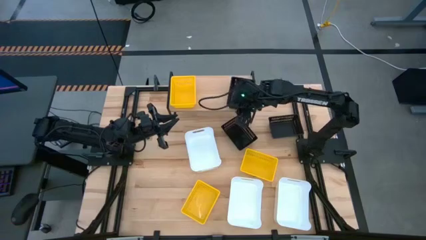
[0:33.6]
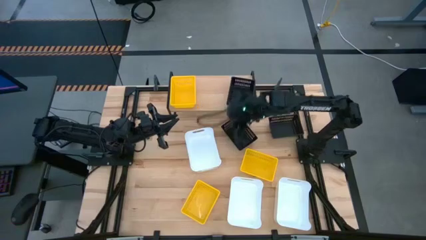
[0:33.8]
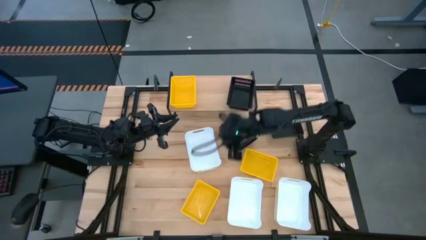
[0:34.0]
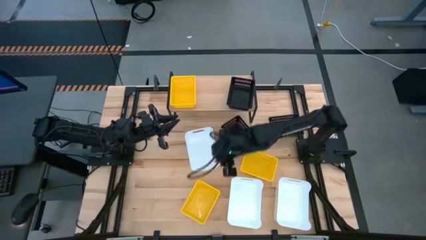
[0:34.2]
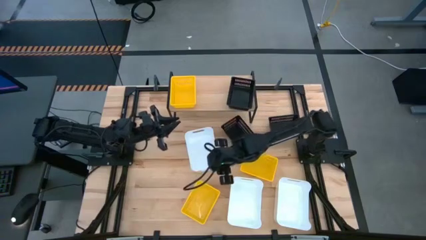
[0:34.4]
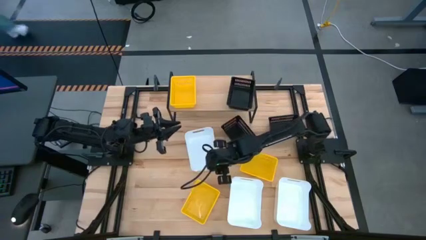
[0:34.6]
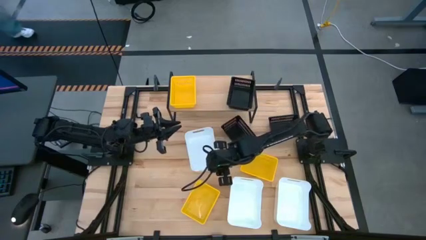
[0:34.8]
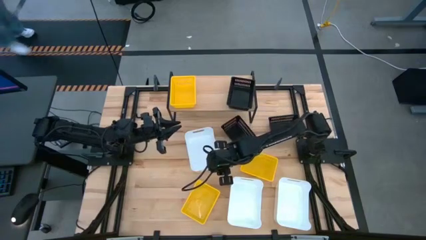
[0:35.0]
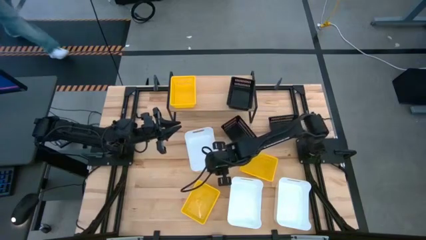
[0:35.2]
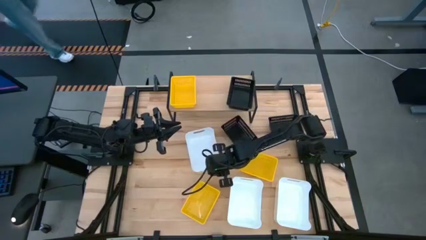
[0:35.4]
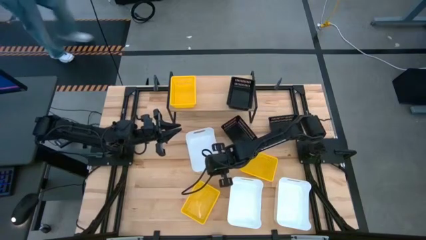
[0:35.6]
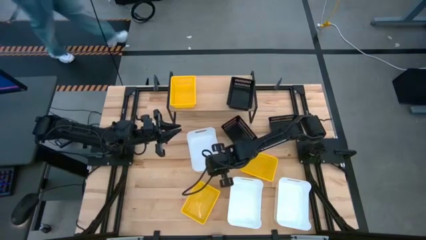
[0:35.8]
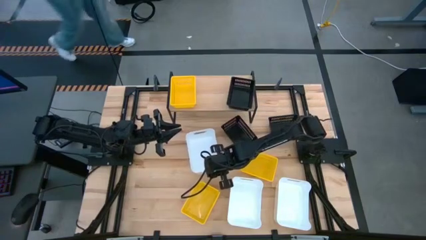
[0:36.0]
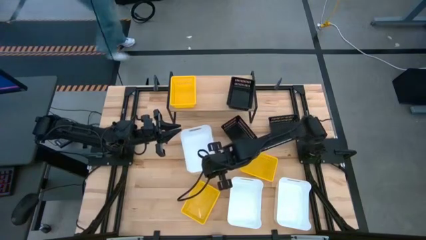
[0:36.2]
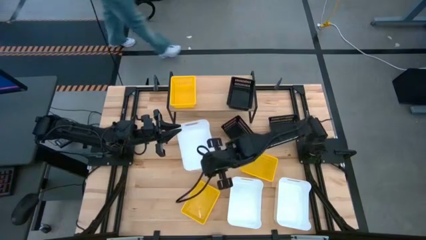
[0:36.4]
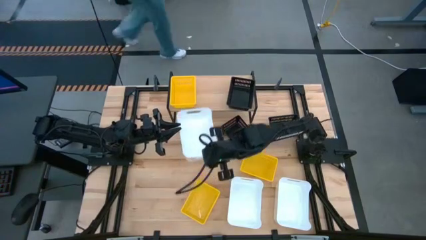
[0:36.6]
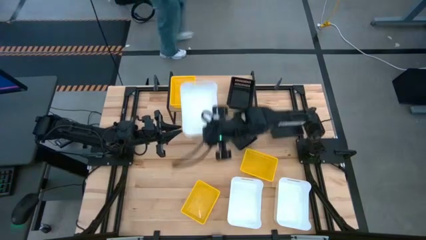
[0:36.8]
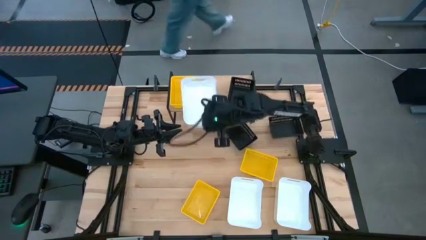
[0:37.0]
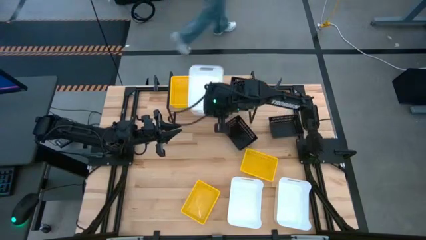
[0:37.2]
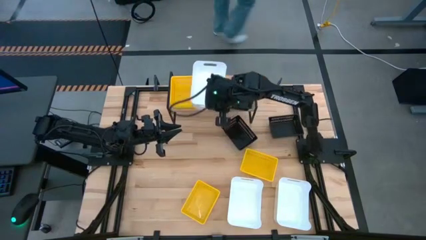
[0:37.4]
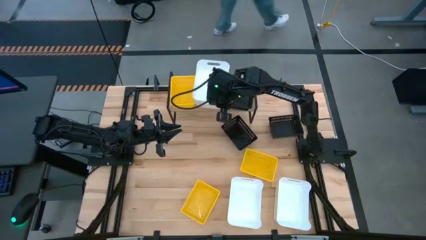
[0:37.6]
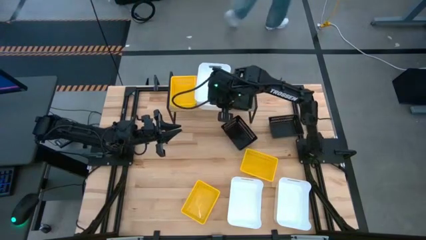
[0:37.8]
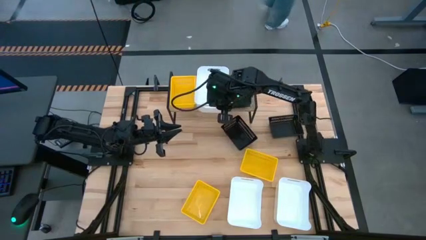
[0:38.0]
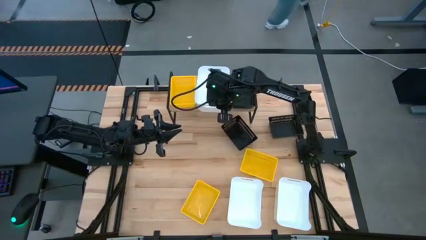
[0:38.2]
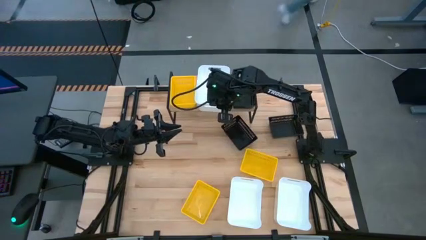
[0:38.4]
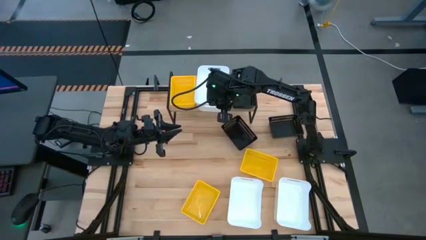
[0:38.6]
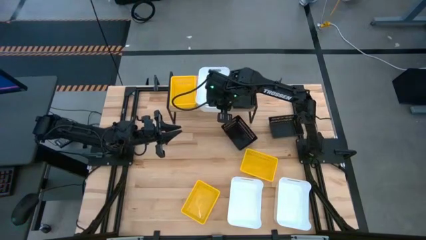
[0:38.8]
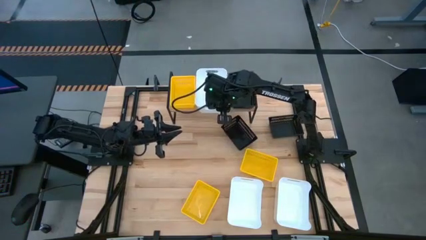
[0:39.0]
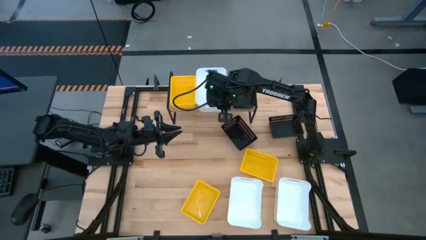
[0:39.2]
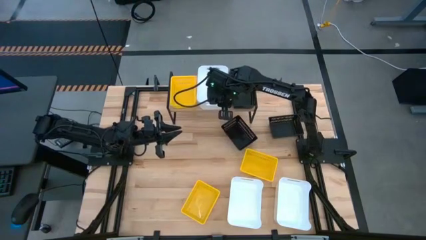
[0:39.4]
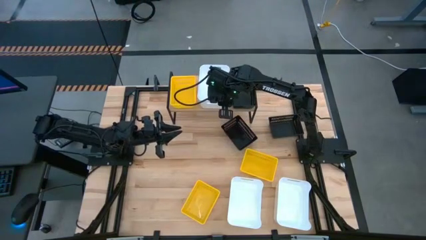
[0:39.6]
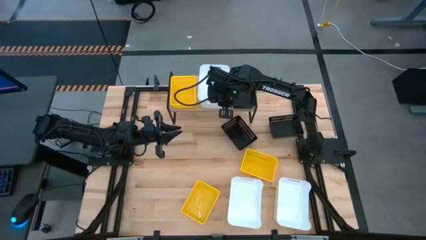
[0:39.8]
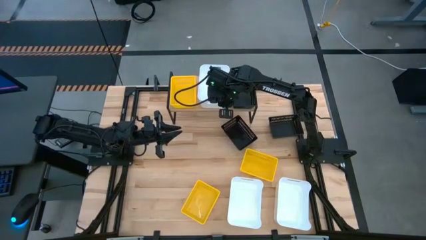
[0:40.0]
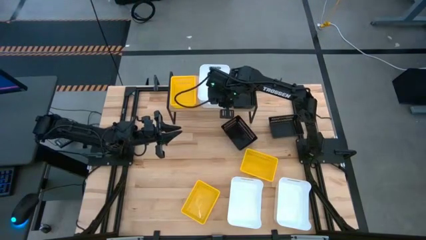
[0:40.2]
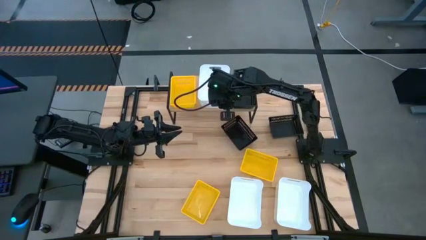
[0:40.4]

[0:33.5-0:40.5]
Task: Stack baskets on shelf by color
Put the top white bin on the shelf

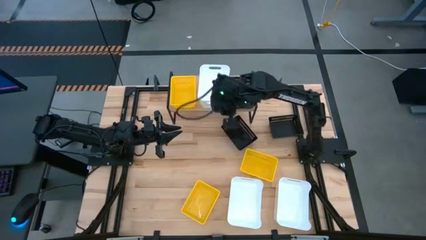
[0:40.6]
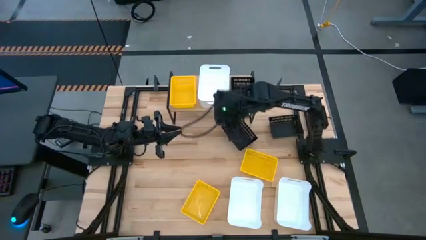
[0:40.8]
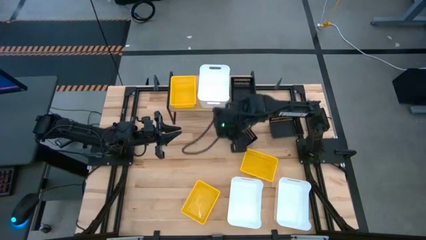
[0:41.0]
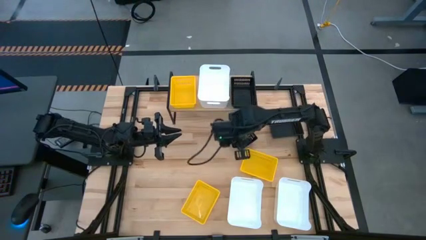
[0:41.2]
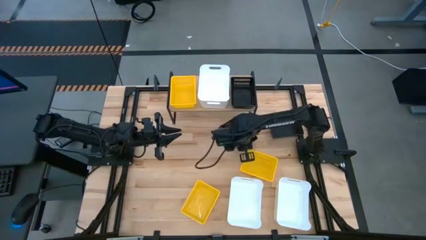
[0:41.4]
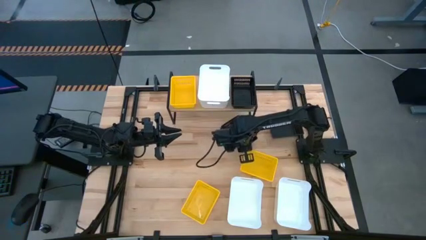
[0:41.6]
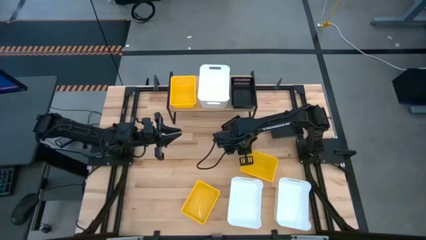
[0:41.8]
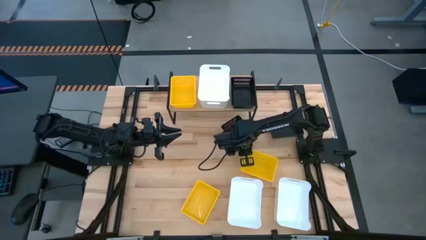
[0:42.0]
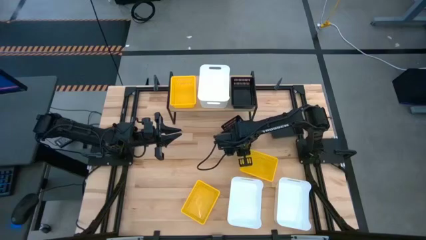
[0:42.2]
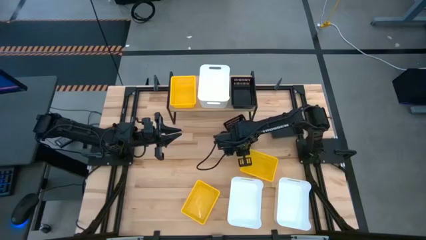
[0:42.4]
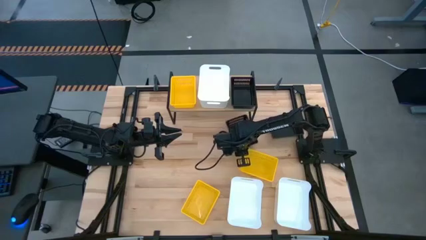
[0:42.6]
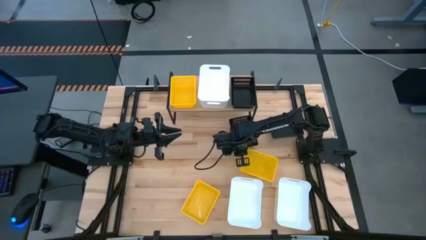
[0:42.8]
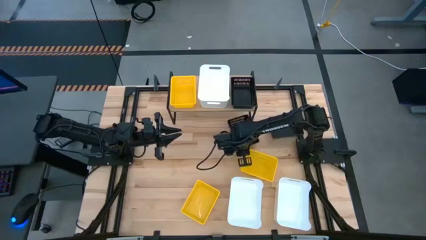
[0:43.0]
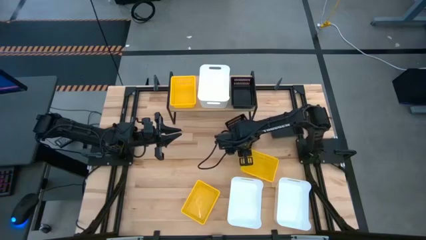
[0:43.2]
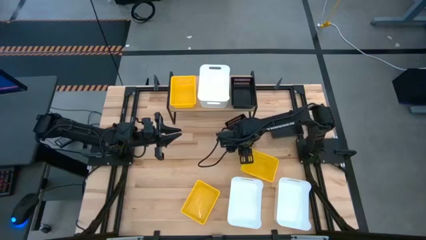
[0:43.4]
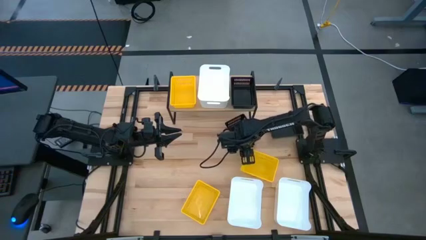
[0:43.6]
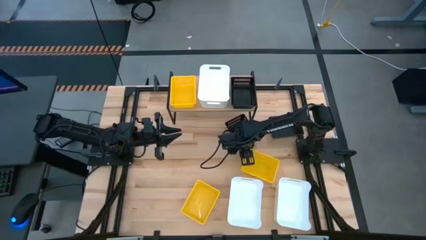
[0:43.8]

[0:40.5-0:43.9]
Stack the left black basket on the black basket on the shelf

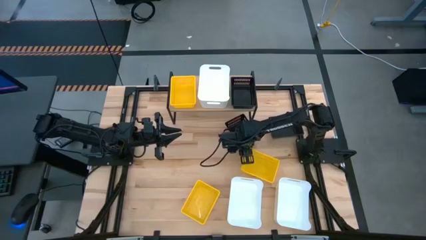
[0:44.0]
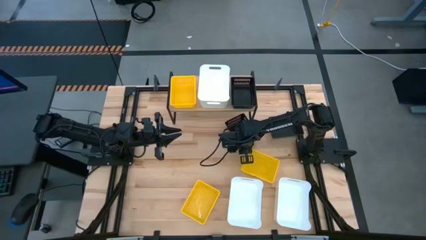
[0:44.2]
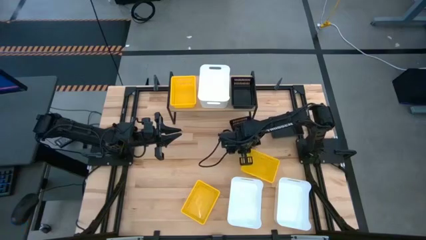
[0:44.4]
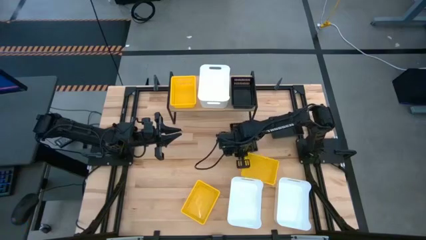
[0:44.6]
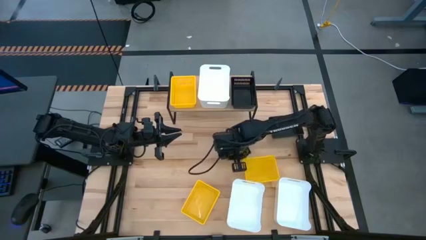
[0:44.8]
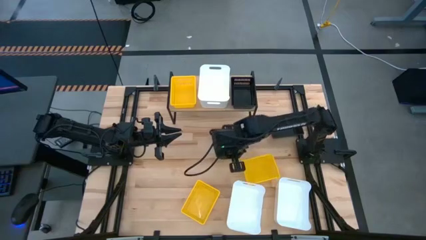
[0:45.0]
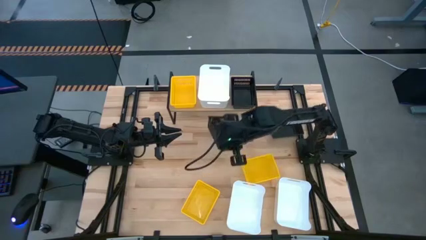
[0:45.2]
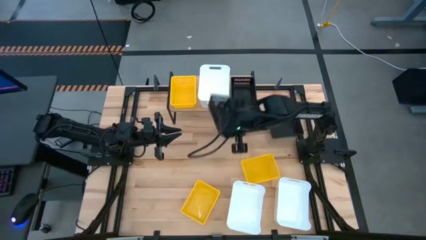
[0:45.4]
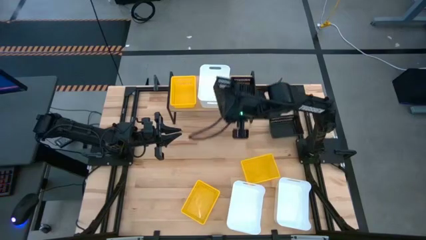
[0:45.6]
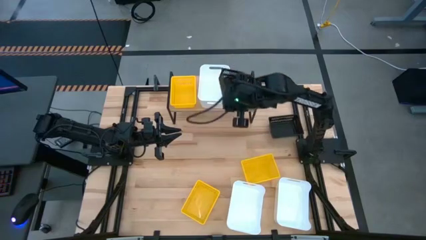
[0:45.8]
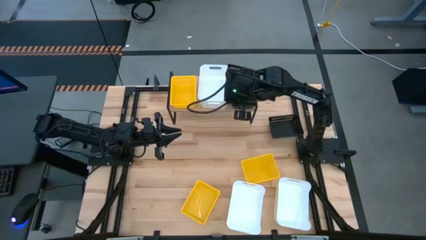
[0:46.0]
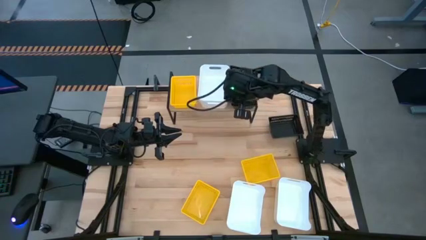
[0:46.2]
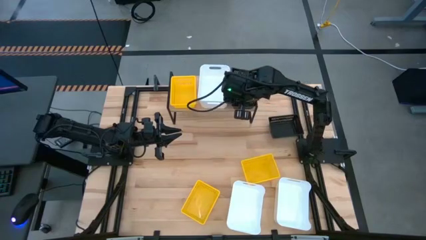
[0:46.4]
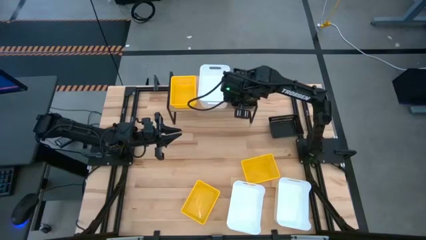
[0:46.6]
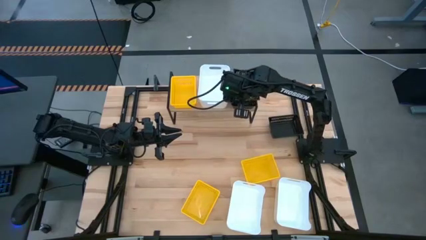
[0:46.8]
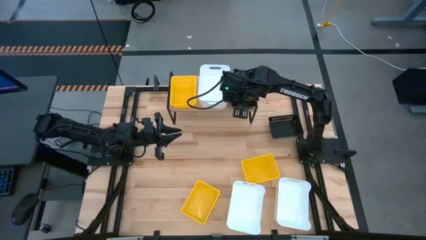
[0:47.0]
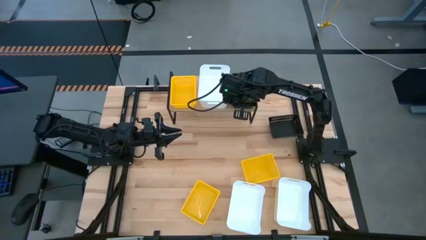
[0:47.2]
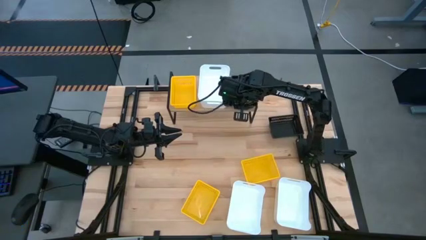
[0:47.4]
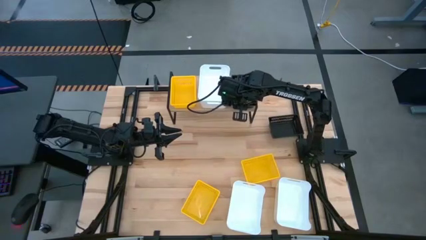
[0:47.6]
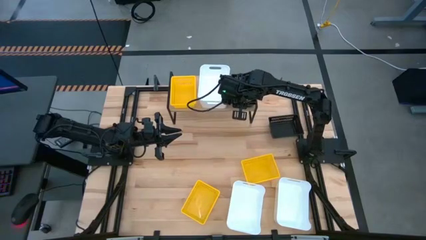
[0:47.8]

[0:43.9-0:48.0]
Stack the left black basket on the black basket on the shelf
